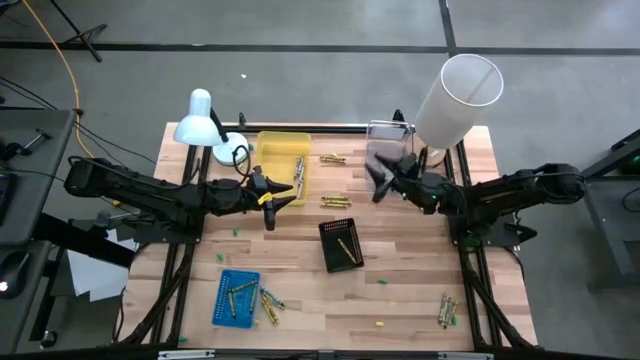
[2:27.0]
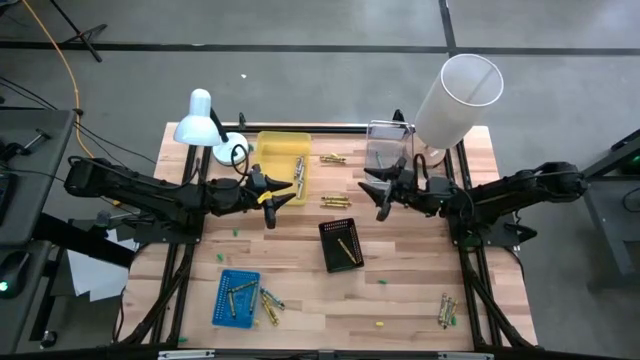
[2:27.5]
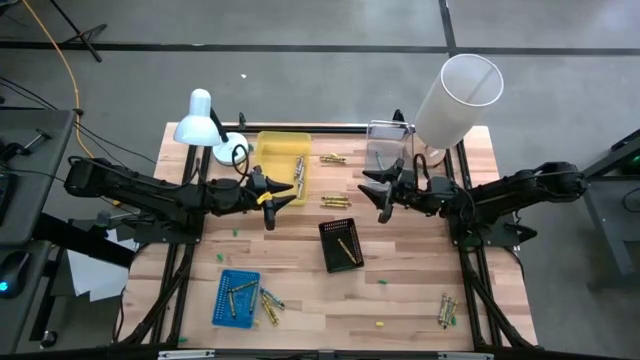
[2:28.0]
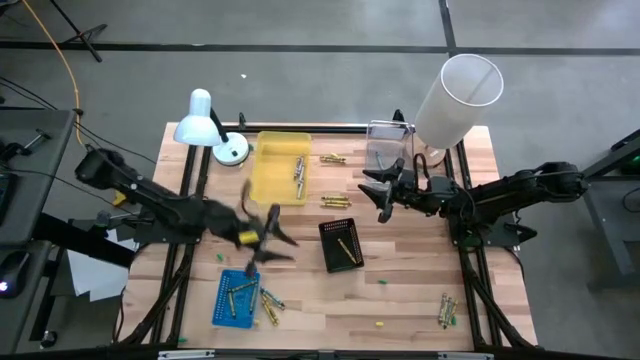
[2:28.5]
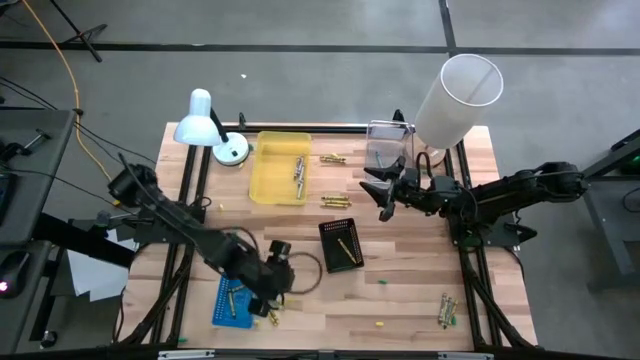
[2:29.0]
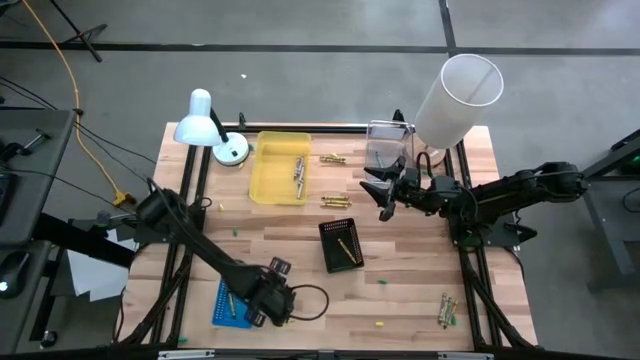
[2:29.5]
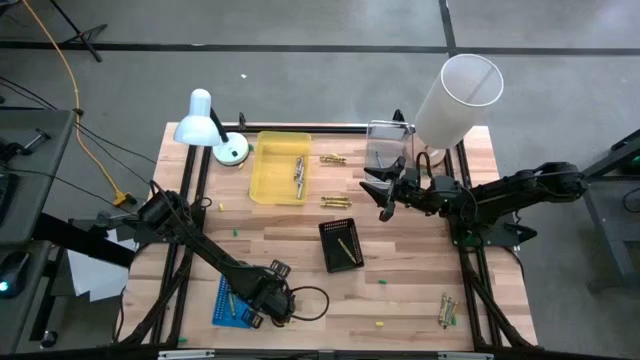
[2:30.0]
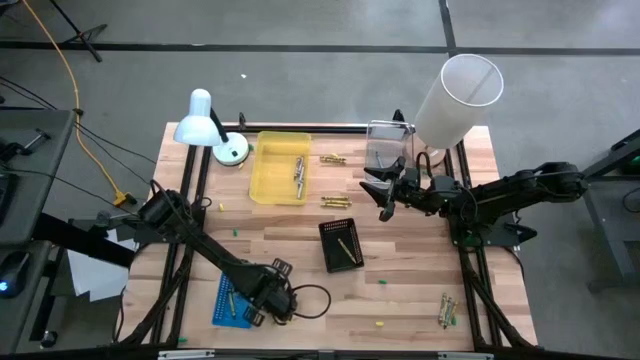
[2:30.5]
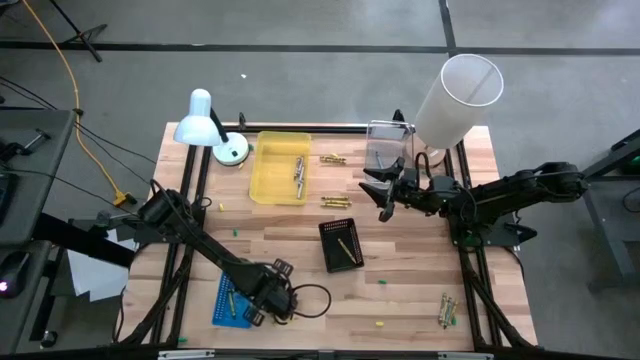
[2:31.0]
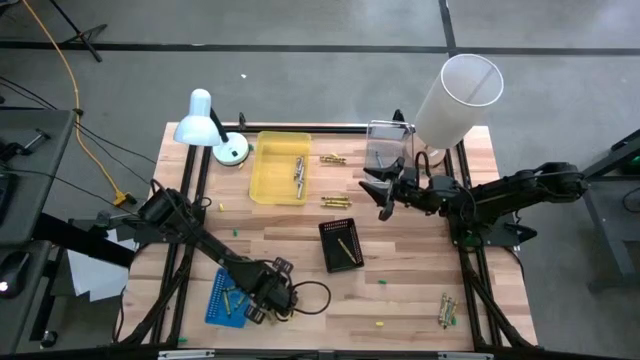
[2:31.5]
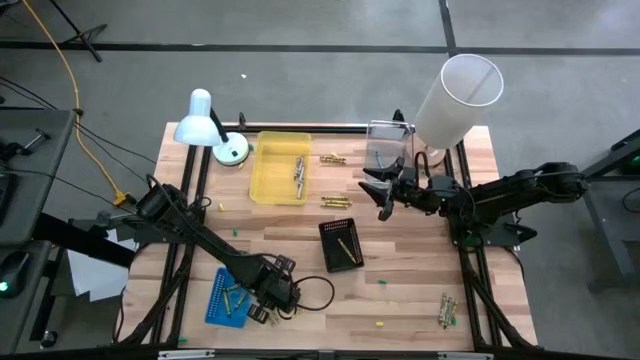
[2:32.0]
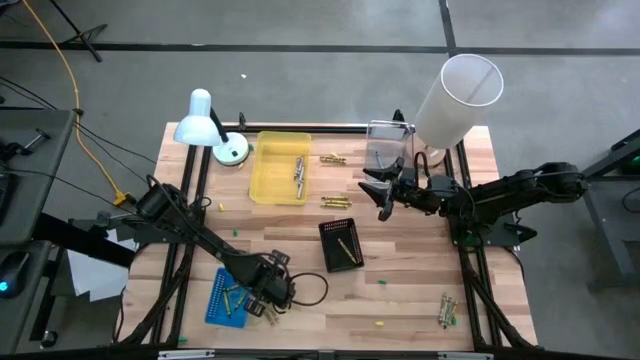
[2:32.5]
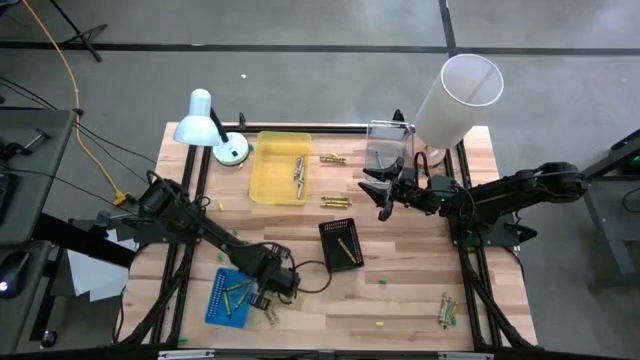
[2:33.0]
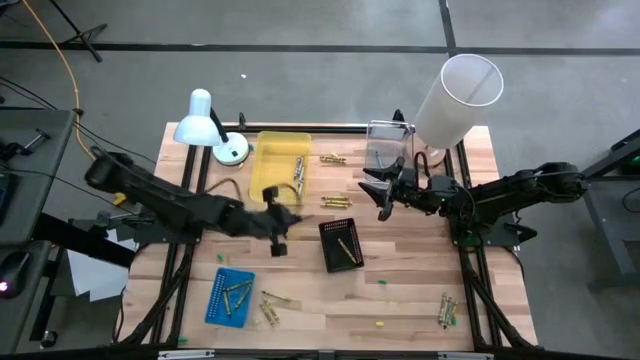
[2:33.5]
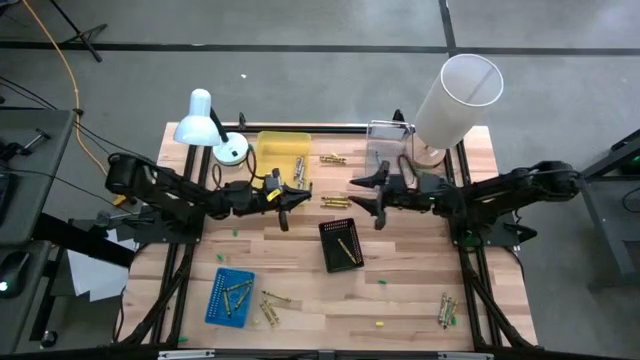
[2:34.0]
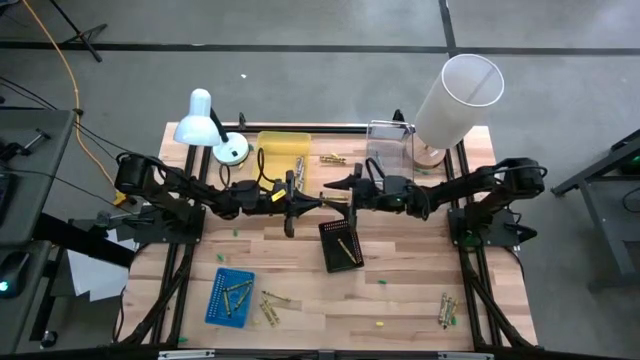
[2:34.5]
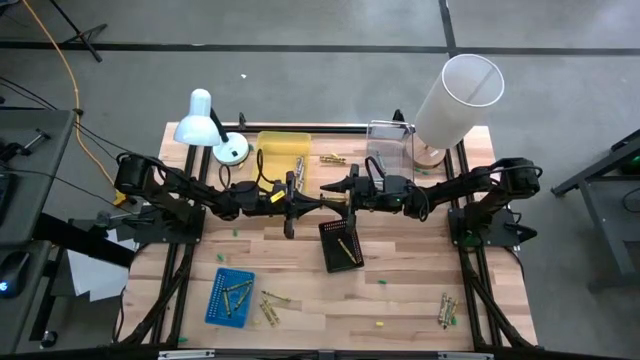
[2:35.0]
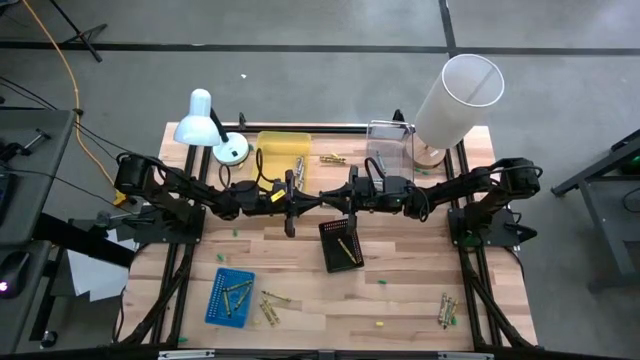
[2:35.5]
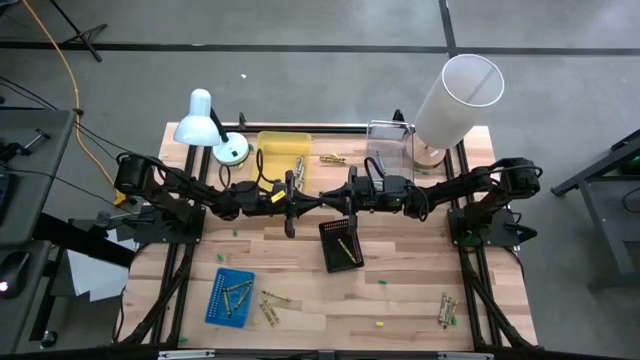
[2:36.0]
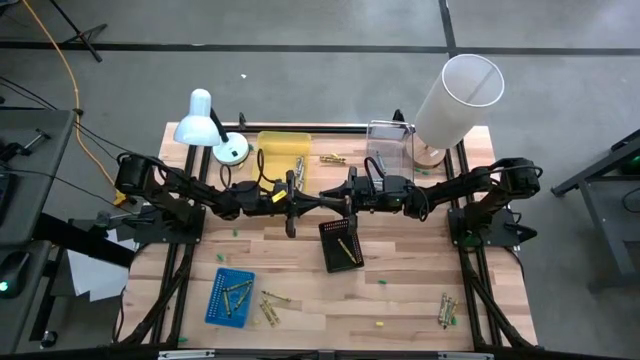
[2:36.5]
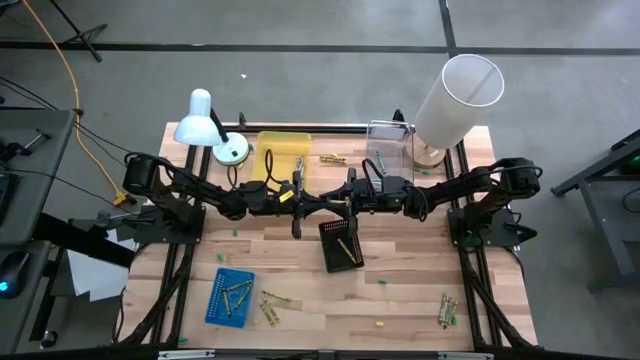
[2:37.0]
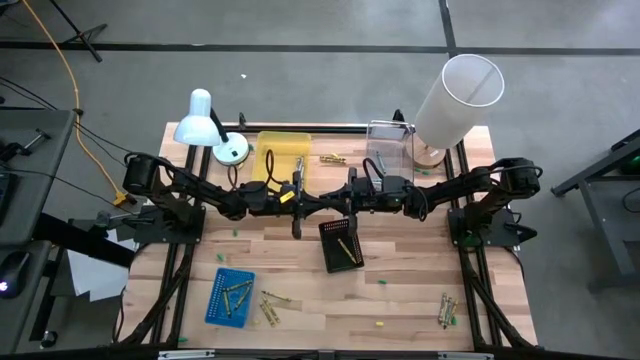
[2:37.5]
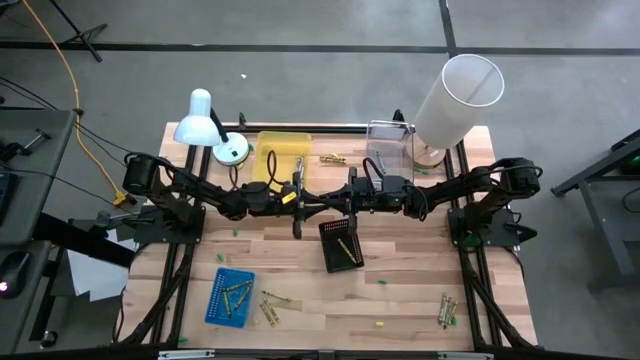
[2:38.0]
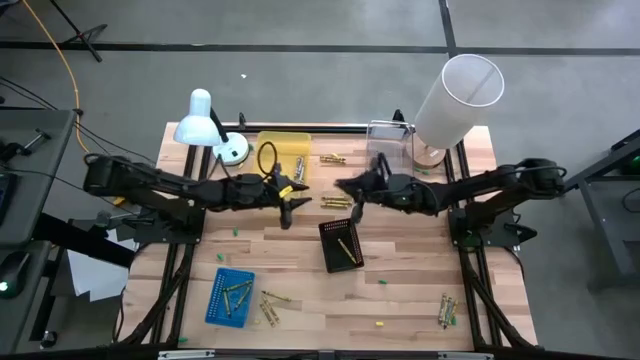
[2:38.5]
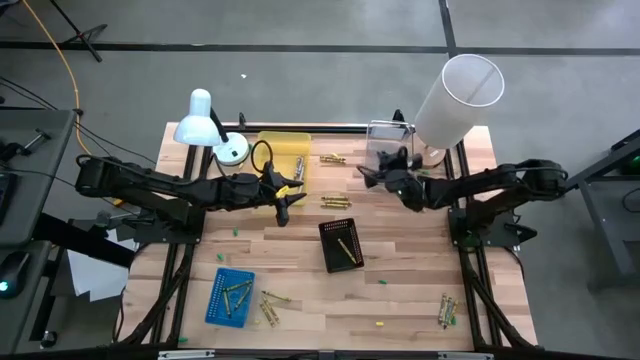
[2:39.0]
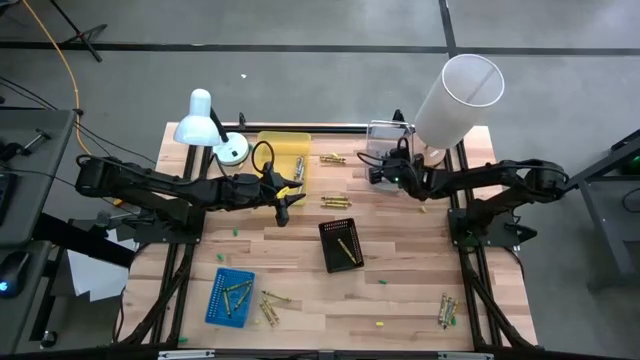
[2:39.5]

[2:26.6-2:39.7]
Task: Sort crayons
Put the blue crayon into the transparent bin

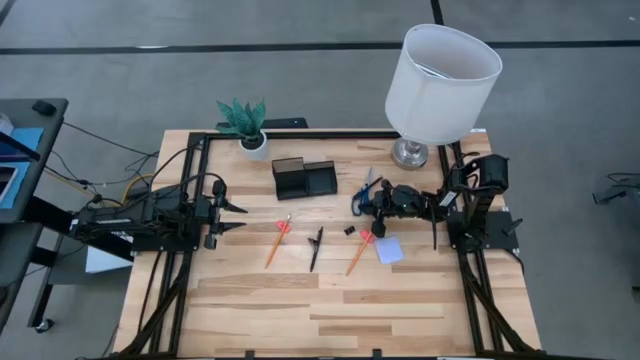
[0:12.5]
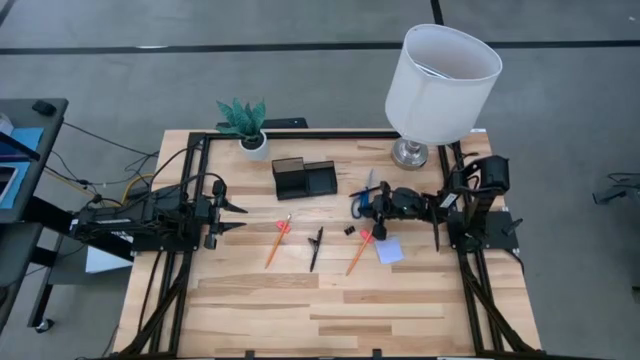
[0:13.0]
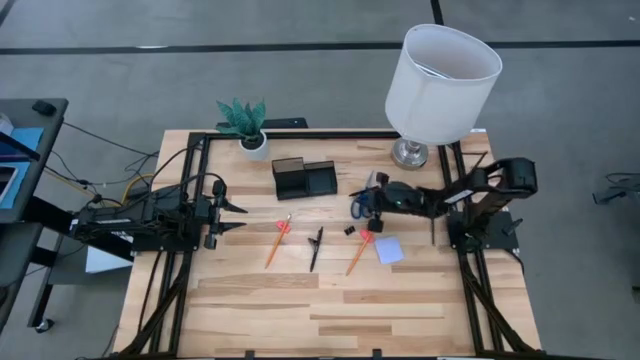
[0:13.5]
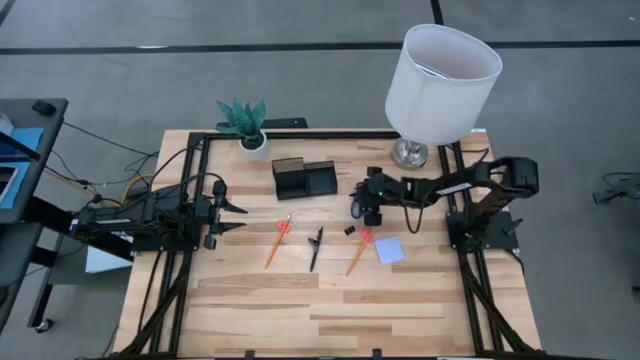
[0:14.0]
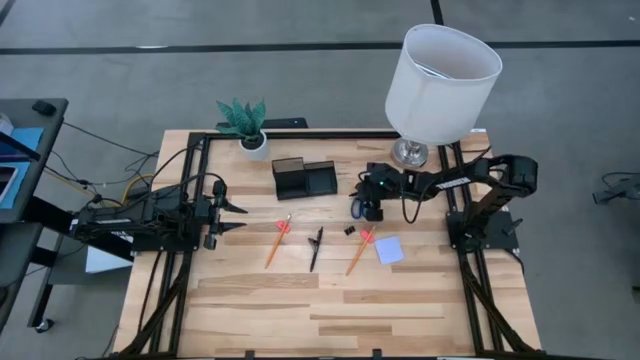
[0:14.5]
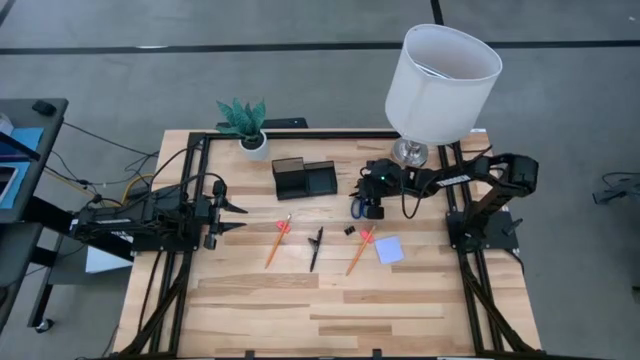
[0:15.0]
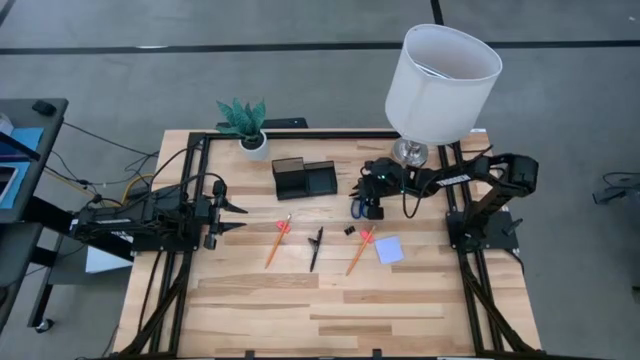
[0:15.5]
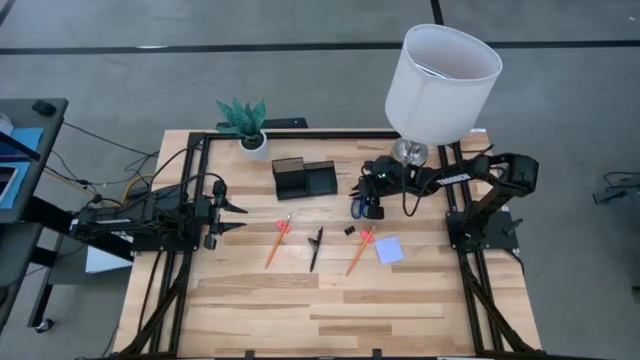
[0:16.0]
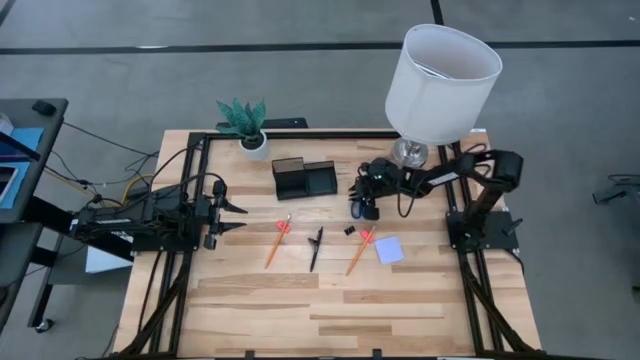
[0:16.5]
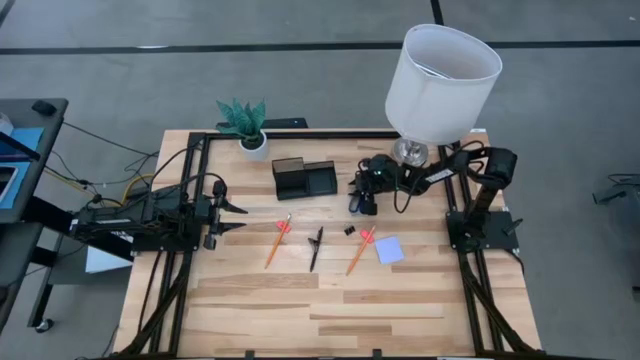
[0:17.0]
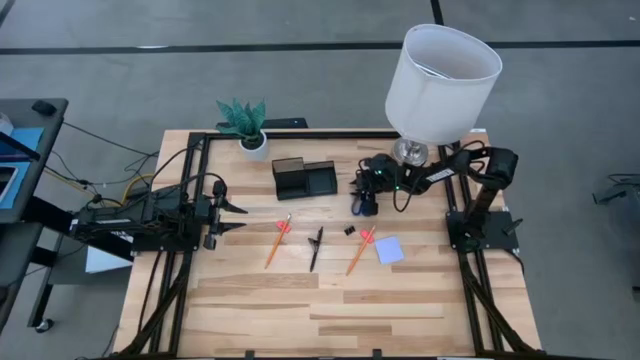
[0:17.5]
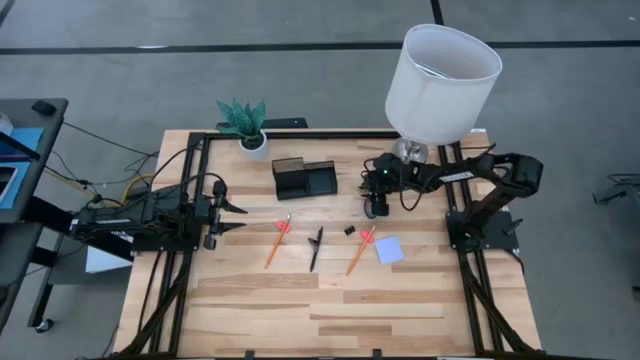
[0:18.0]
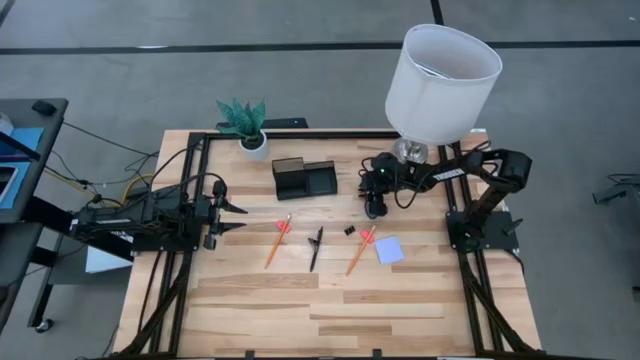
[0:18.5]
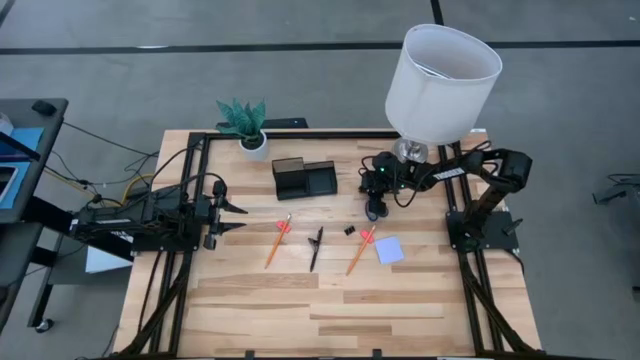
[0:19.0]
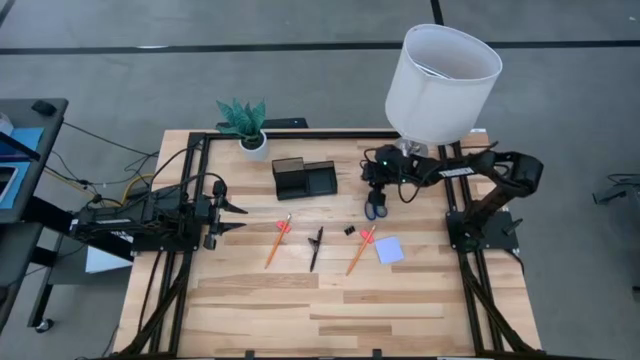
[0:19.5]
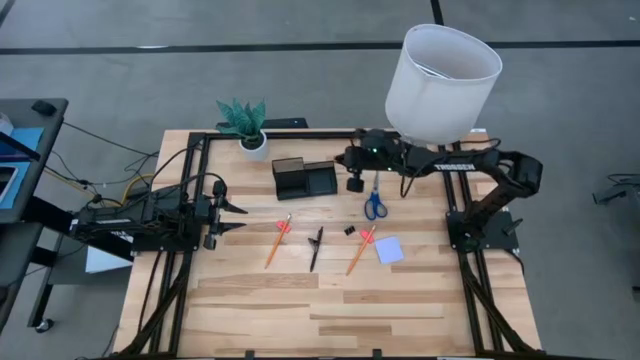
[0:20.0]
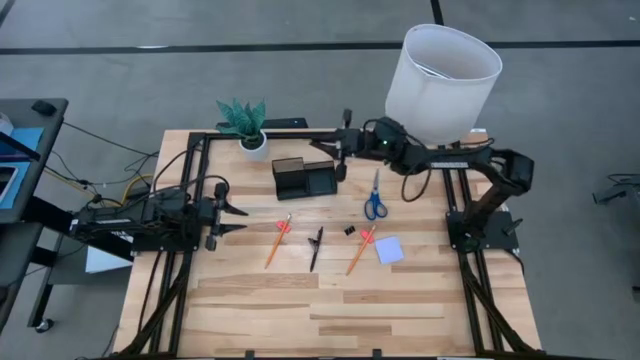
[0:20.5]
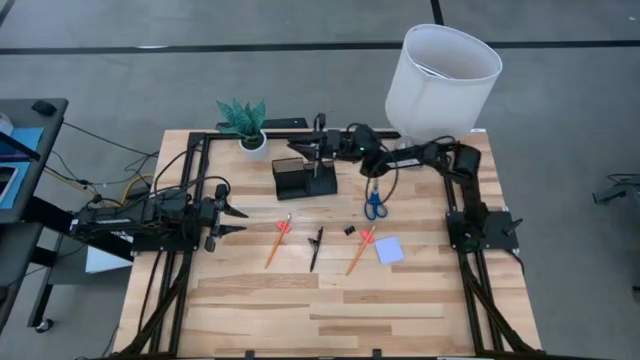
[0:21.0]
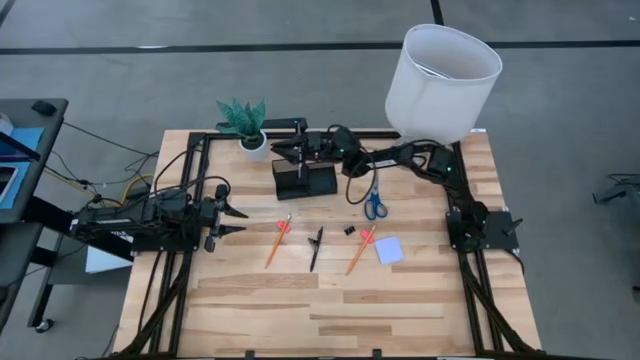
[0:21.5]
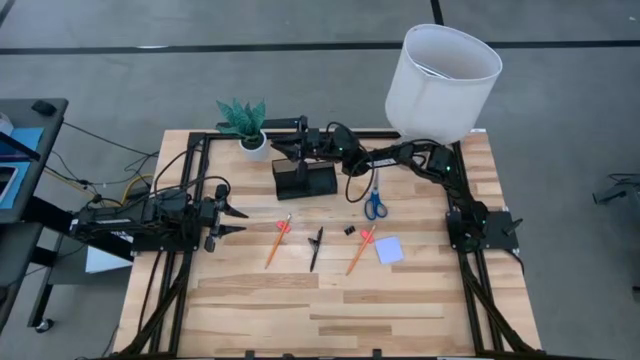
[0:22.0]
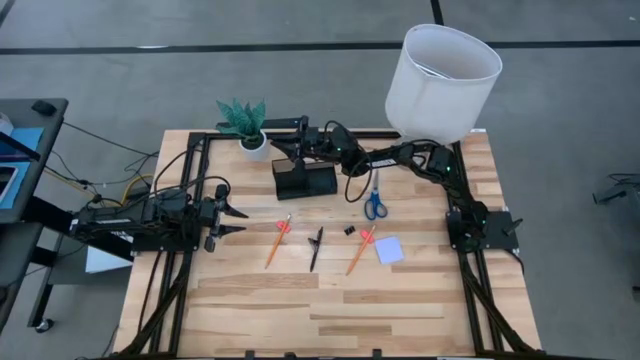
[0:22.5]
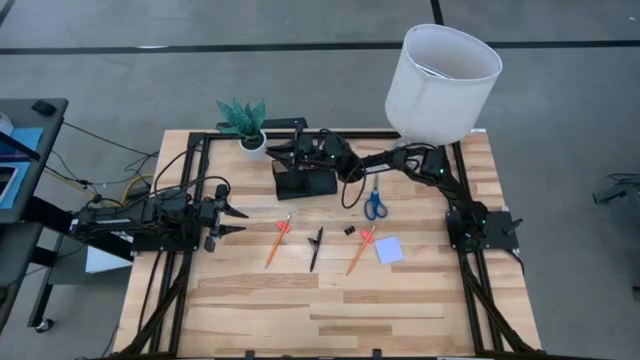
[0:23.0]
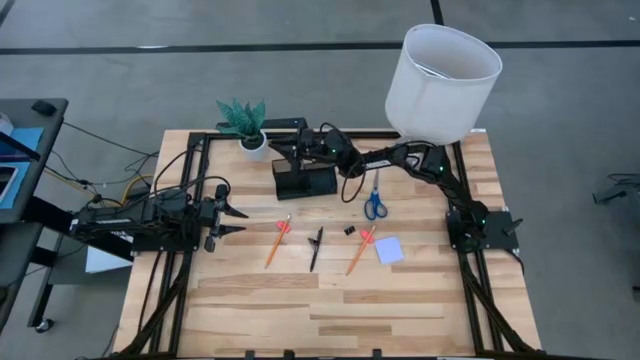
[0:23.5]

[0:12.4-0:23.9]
Task: Pick and place office supplies into organizer
Put the top black pen into the black desk organizer
